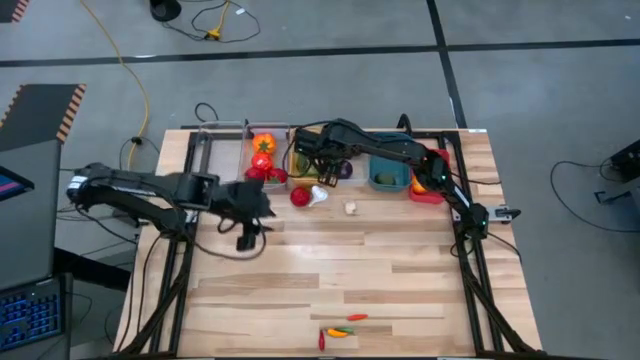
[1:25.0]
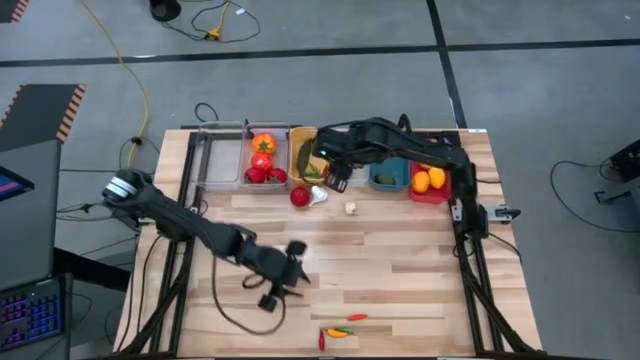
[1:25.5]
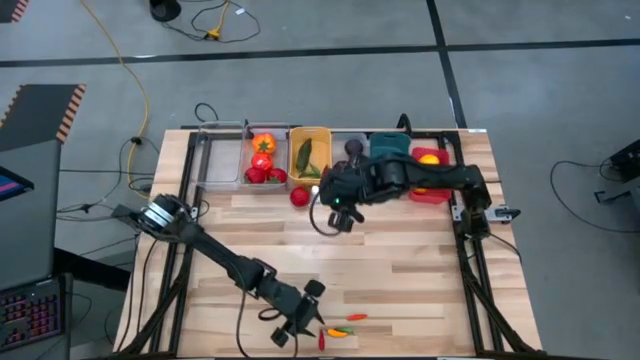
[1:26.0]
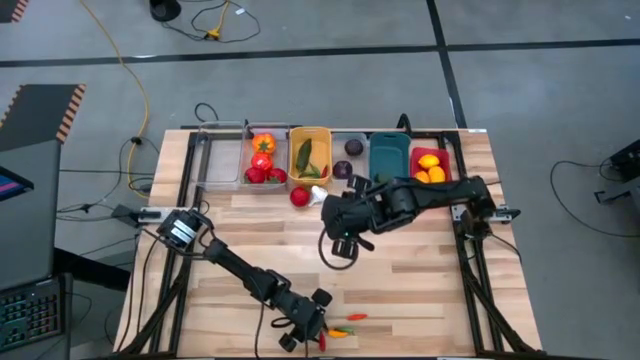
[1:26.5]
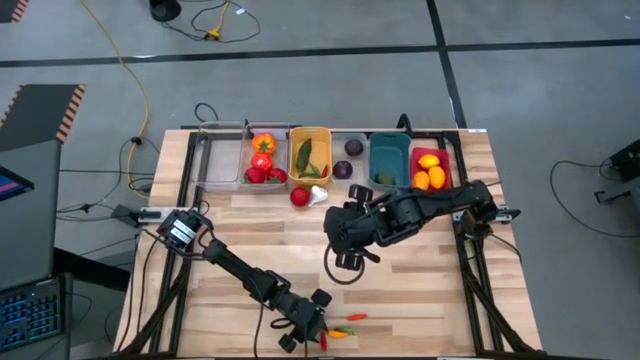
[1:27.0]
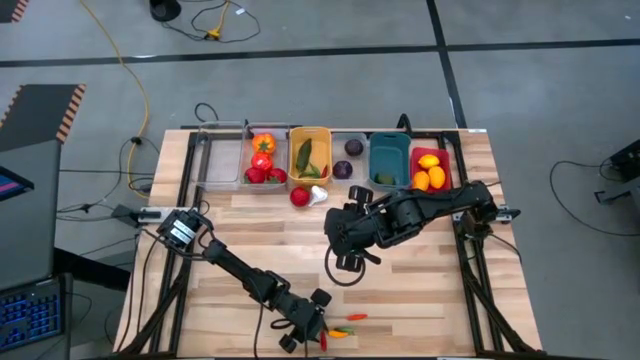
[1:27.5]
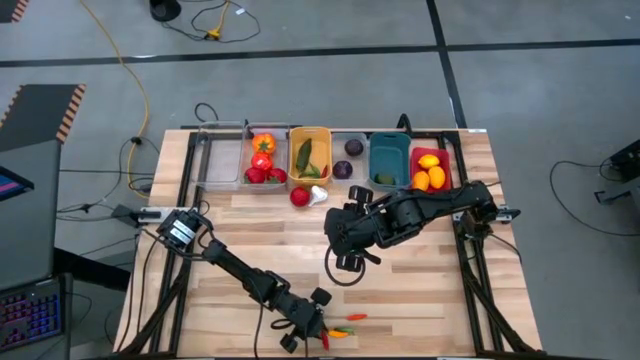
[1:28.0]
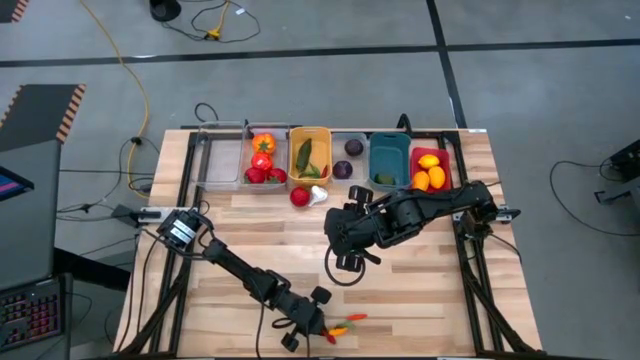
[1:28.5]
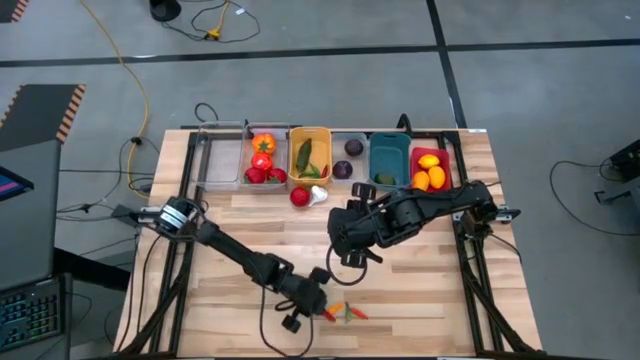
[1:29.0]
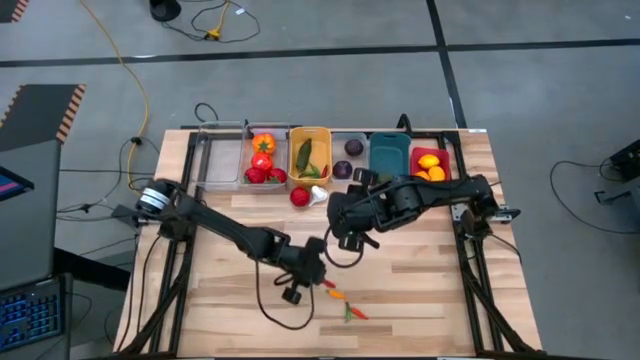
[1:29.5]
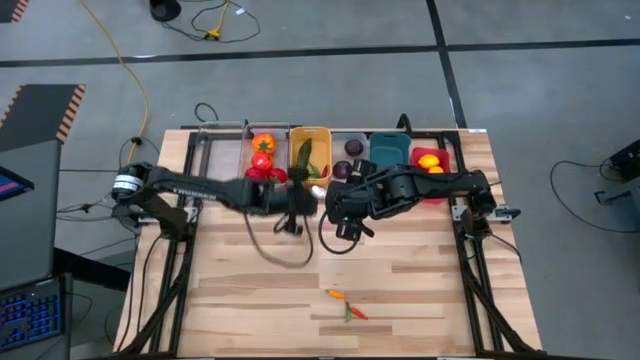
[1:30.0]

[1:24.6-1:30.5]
Task: Sort produce into baskets
Put the red chili pepper into the yellow bin

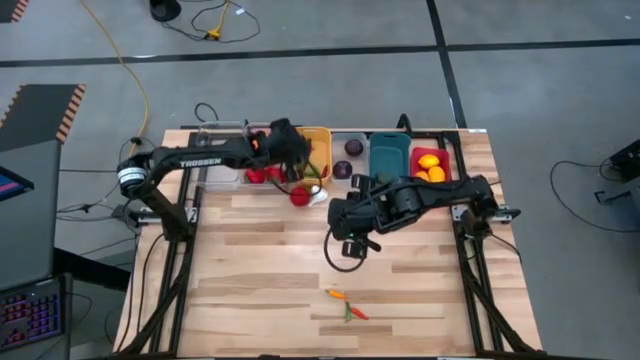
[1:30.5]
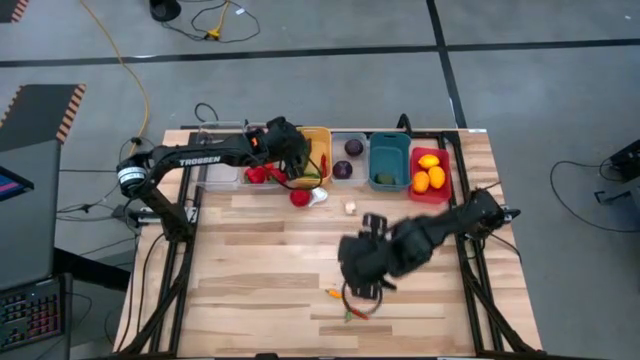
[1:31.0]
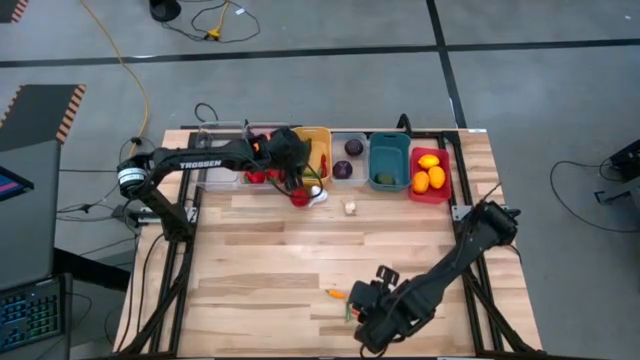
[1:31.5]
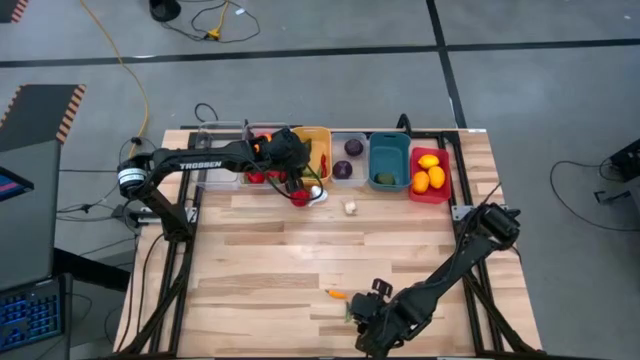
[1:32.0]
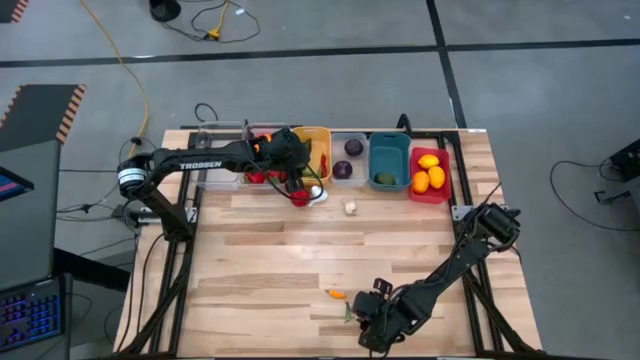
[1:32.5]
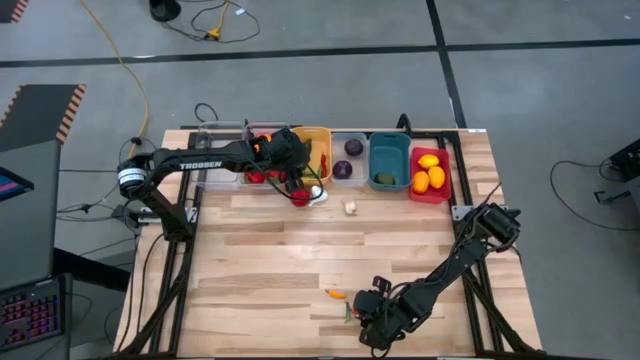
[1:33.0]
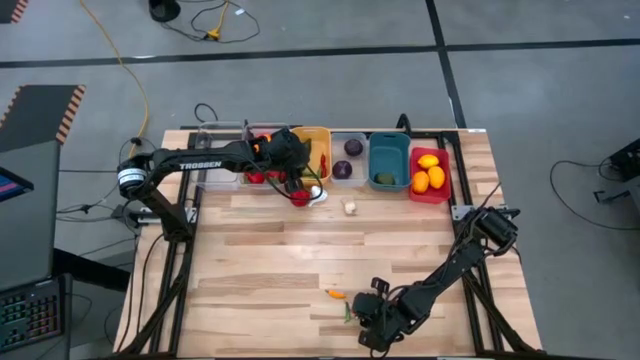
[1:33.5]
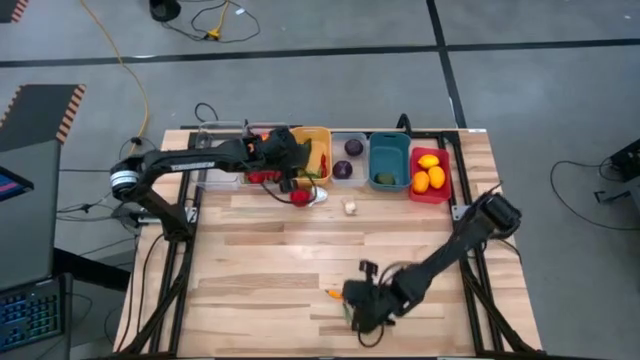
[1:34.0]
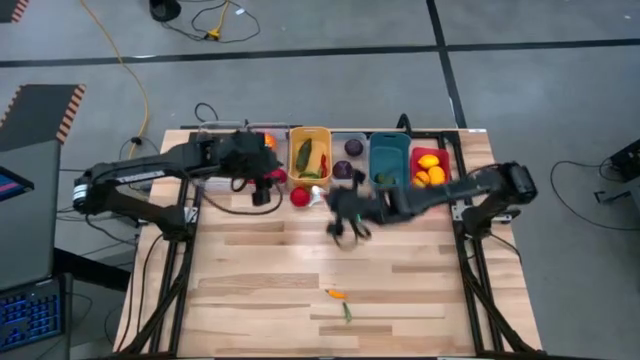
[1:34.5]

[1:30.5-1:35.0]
Put the orange chili pepper into the yellow bin

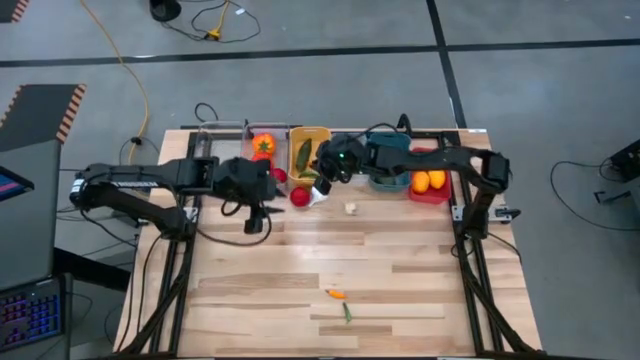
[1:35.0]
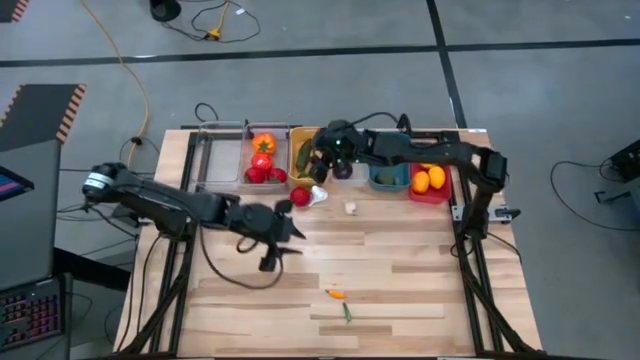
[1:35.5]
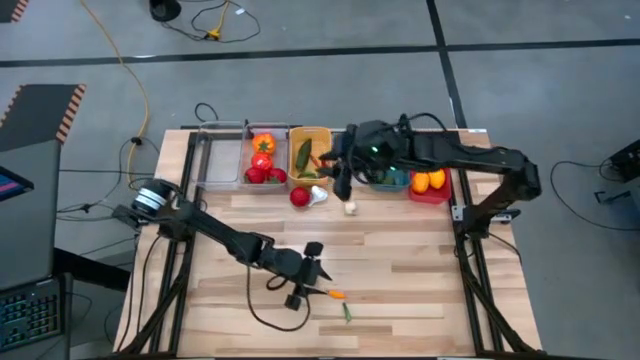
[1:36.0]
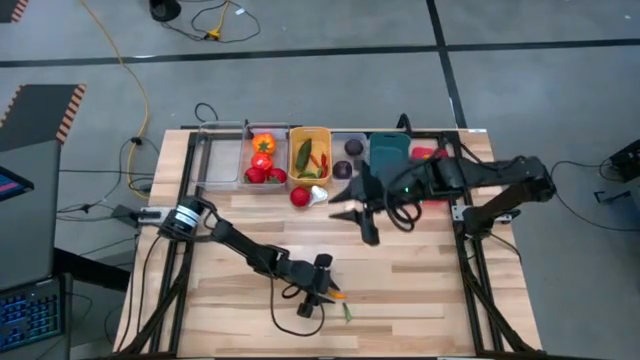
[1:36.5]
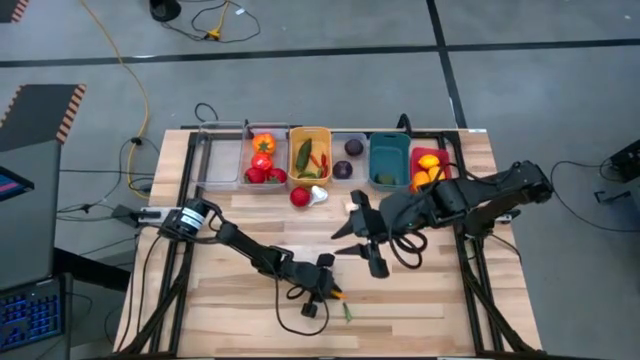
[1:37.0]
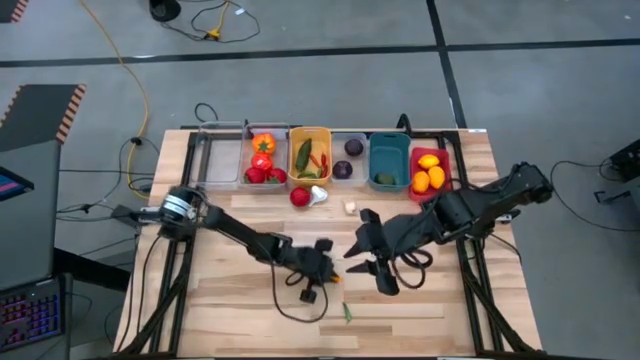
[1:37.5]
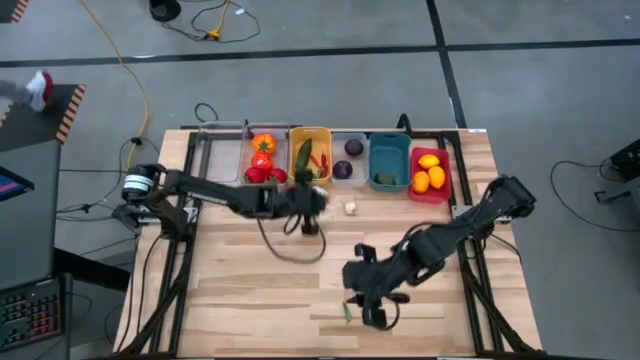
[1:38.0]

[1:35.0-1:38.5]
Put the yellow chili pepper into the yellow bin

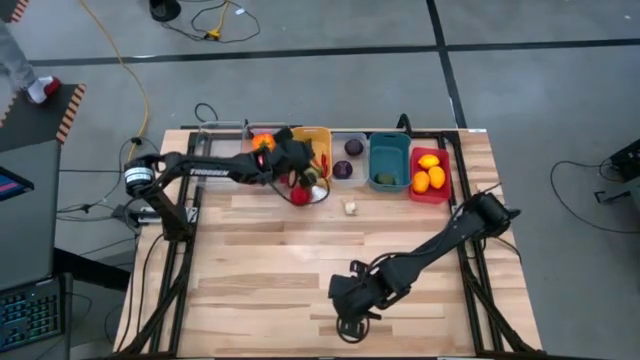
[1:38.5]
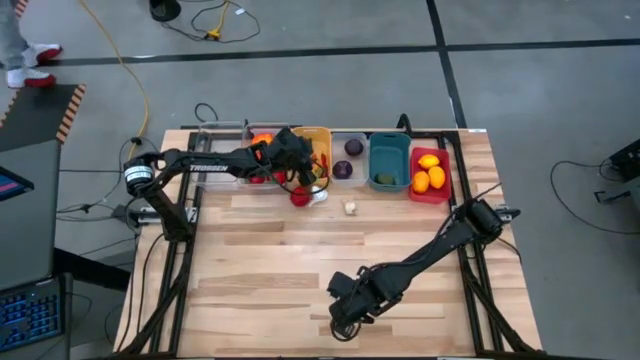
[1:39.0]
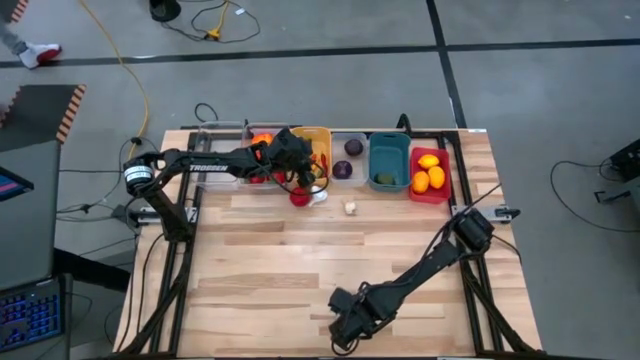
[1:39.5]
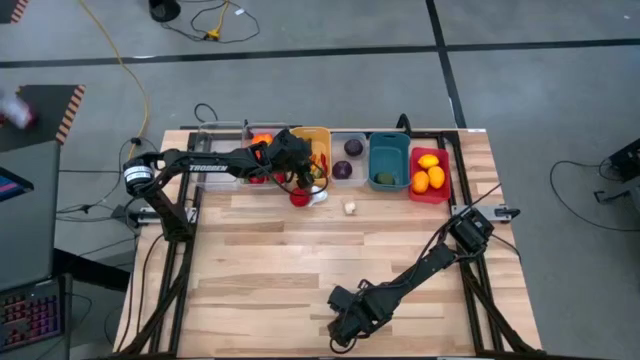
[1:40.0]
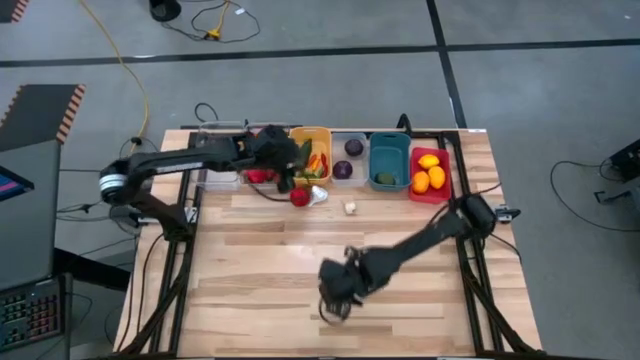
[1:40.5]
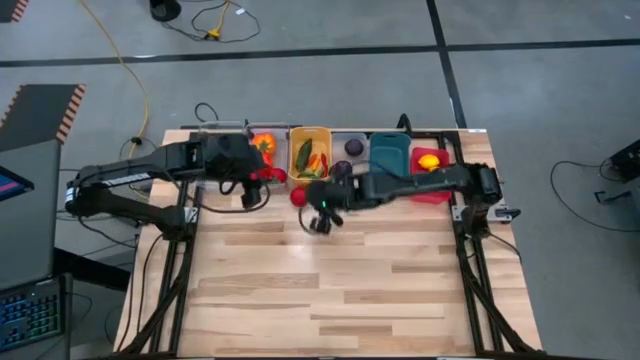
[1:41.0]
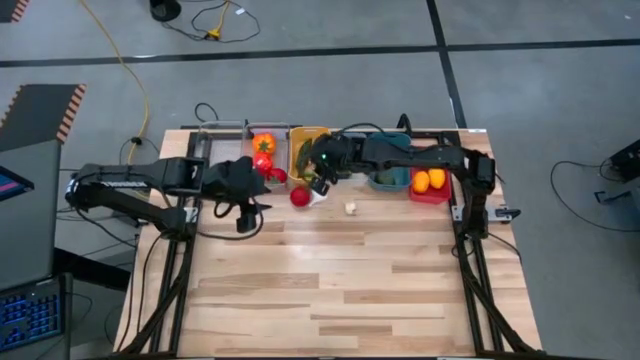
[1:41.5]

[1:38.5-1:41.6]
Put the green chili pepper into the yellow bin

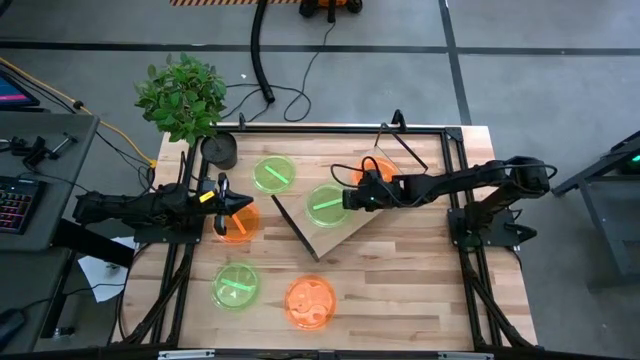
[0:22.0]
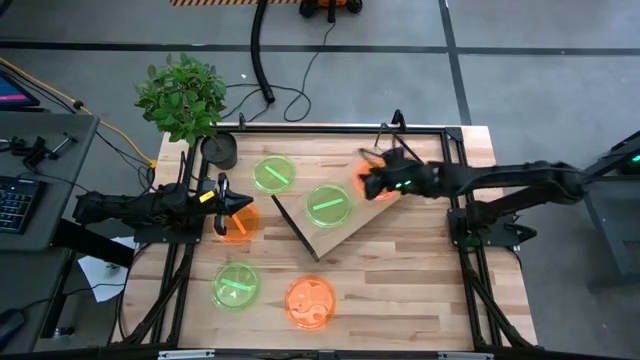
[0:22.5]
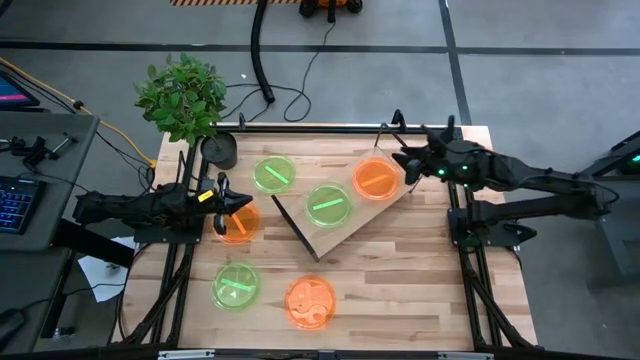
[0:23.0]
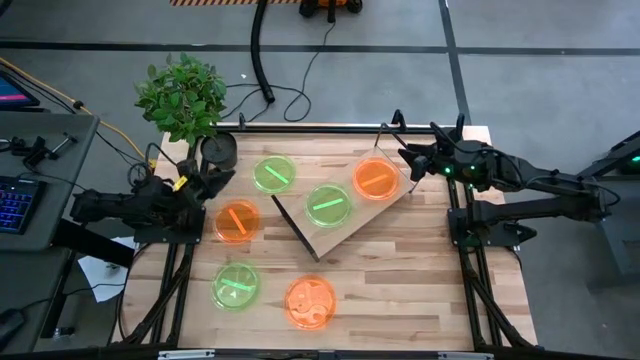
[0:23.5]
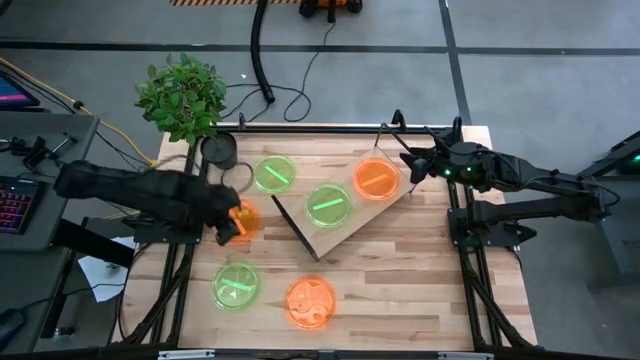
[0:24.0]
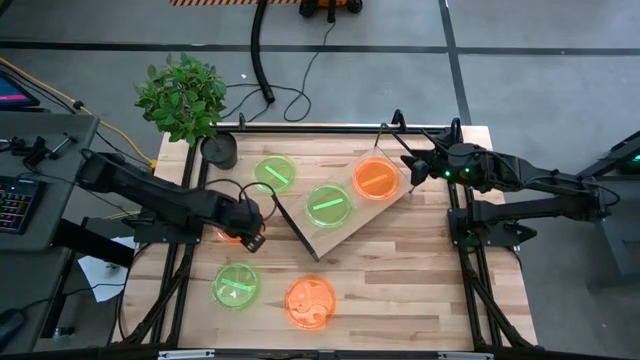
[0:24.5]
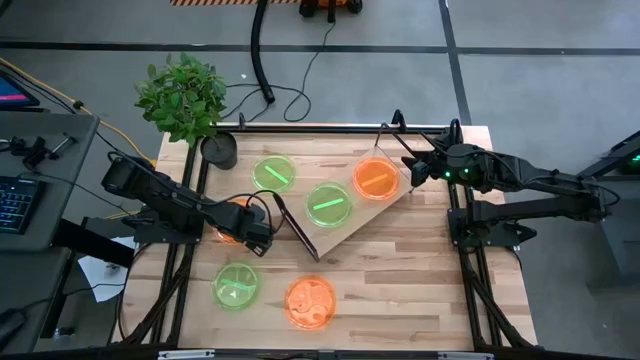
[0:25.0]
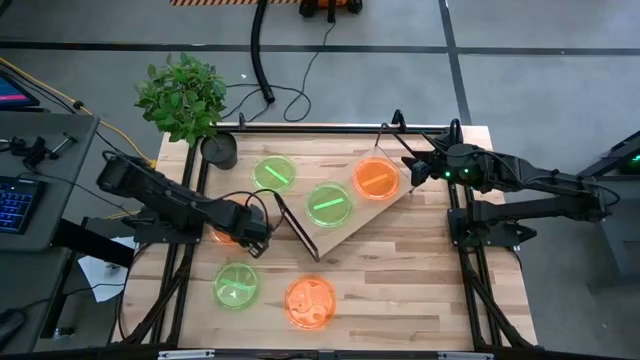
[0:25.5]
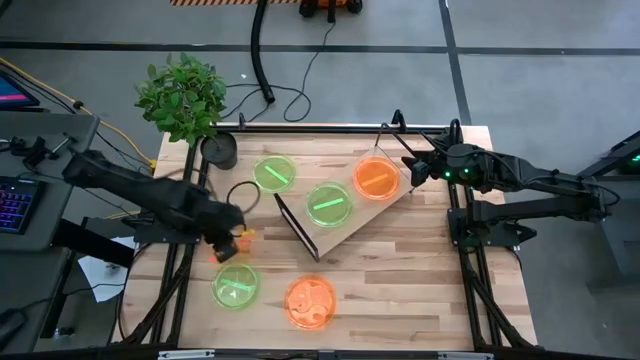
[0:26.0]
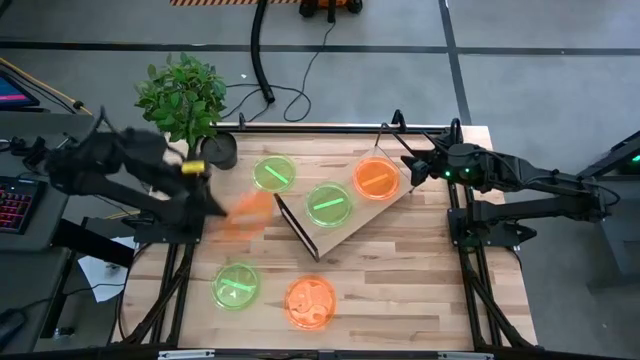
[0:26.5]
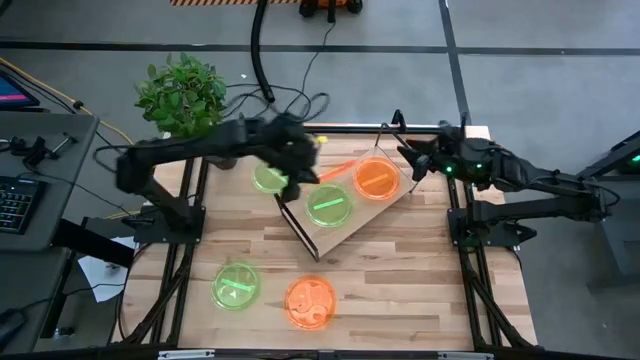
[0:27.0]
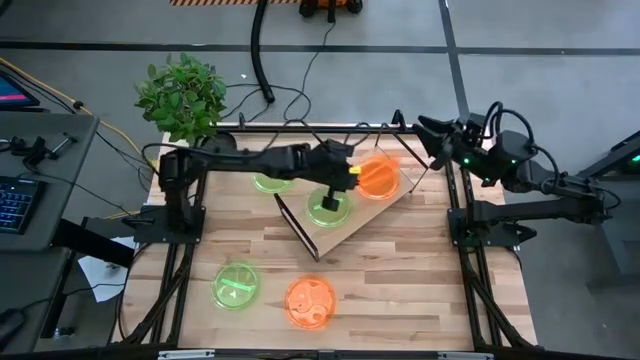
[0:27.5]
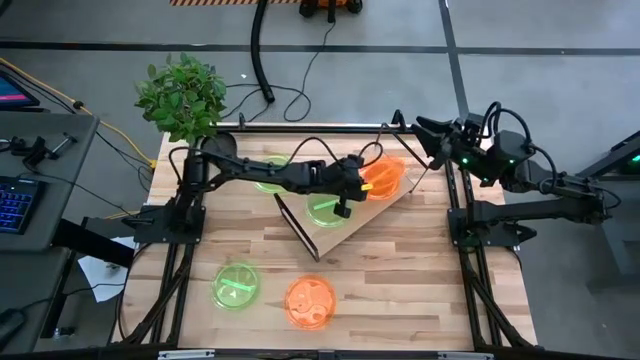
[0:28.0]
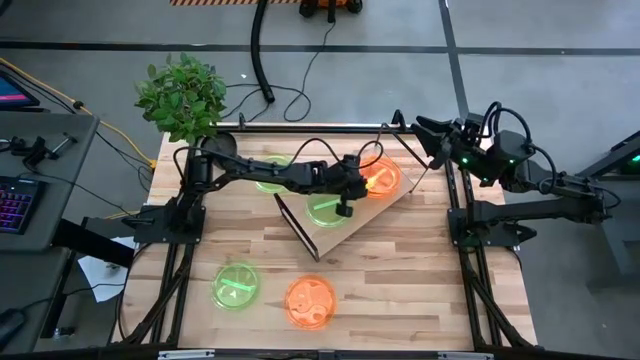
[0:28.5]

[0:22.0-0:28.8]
Task: Place and stack plates onto a shelf
Stack the top orange plate on the top of the orange plate on the shelf
